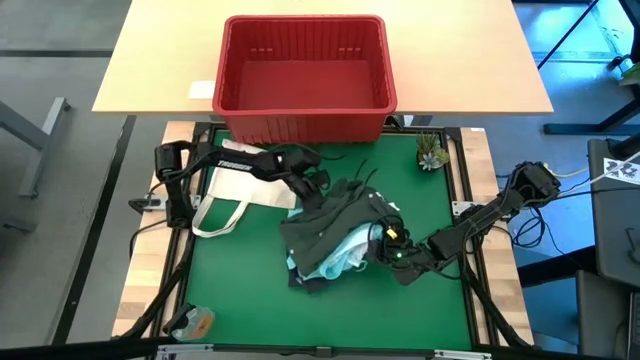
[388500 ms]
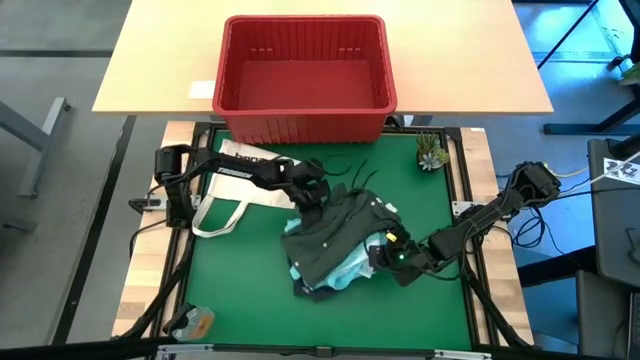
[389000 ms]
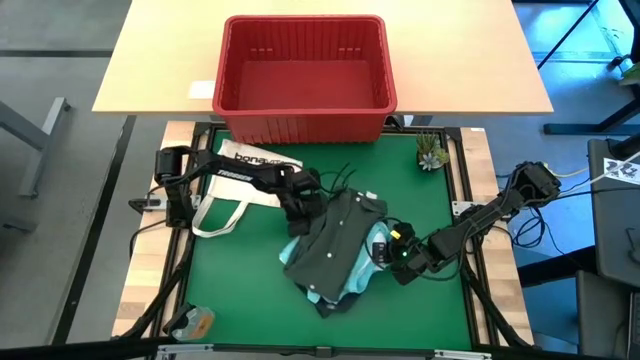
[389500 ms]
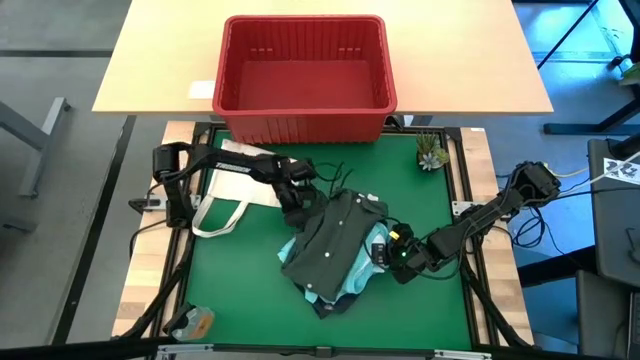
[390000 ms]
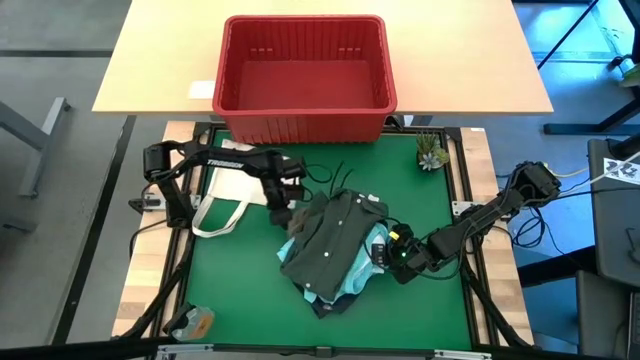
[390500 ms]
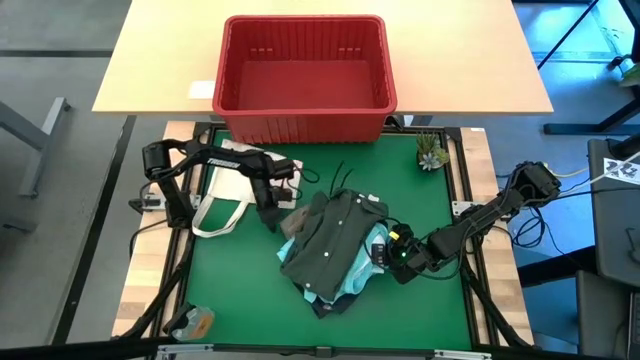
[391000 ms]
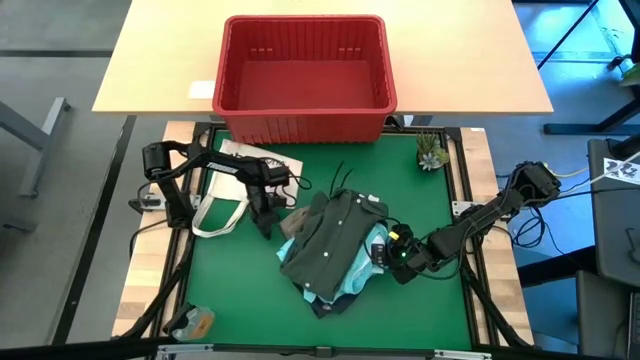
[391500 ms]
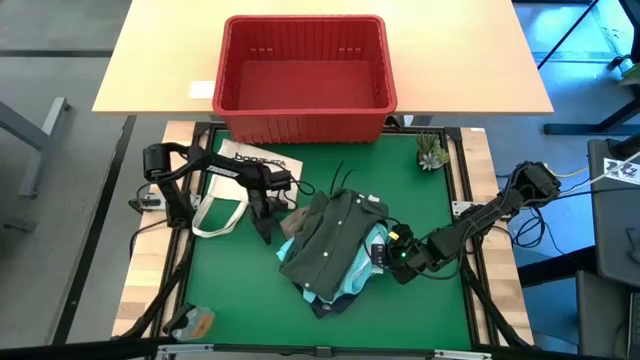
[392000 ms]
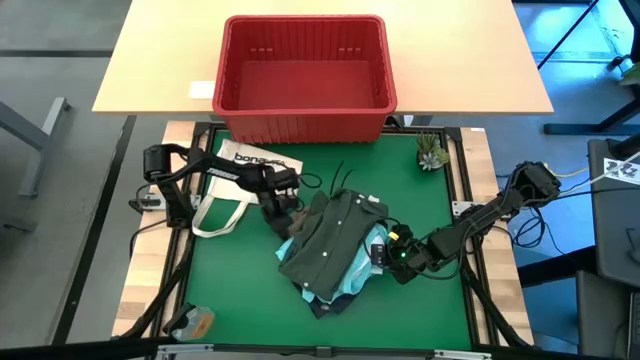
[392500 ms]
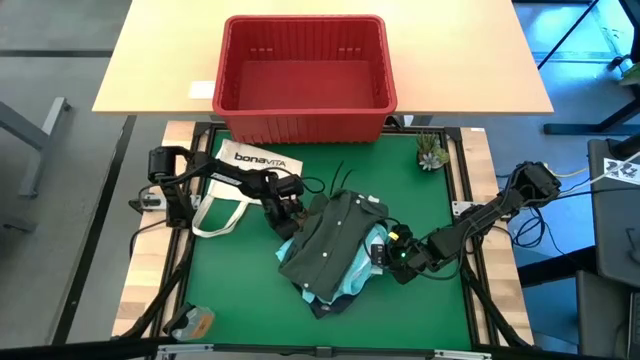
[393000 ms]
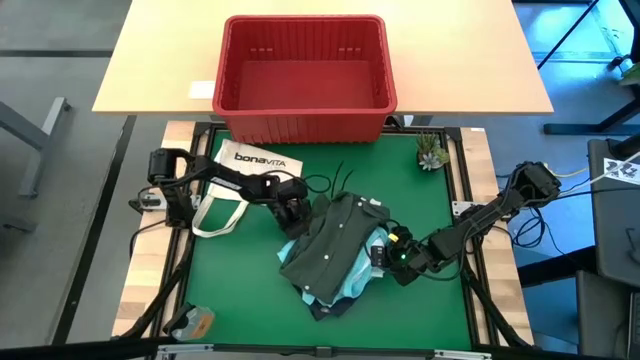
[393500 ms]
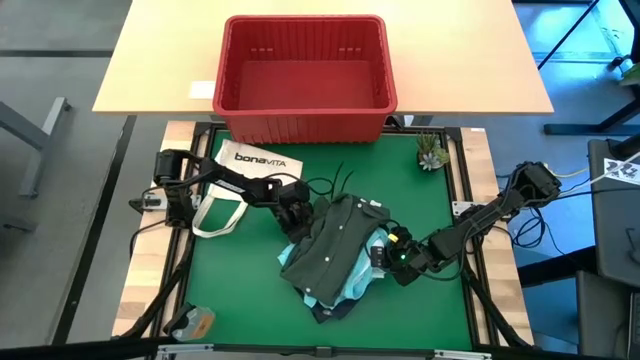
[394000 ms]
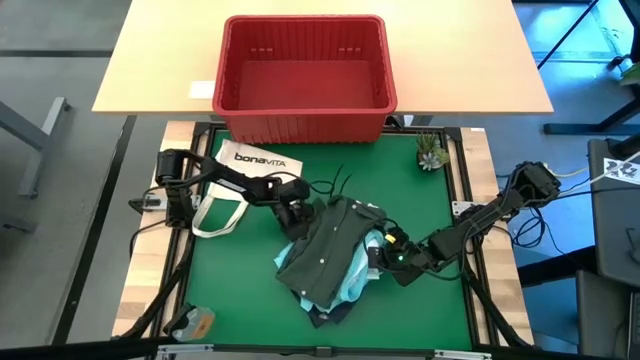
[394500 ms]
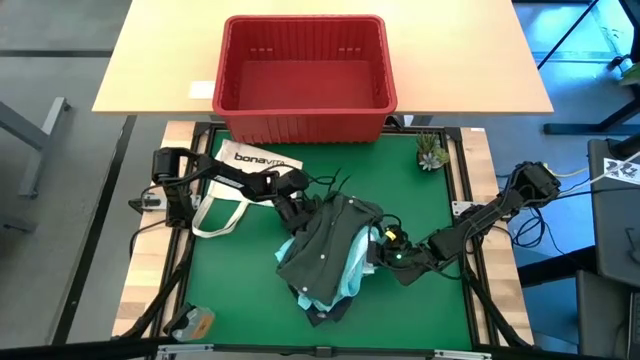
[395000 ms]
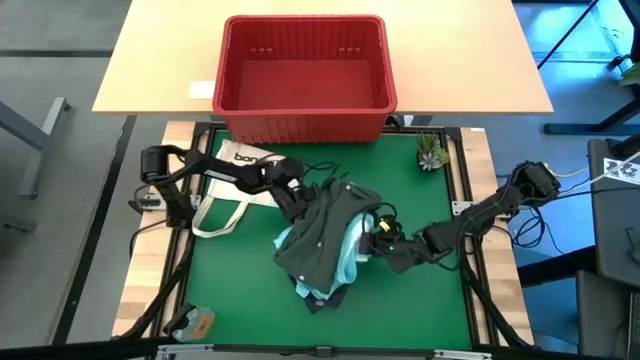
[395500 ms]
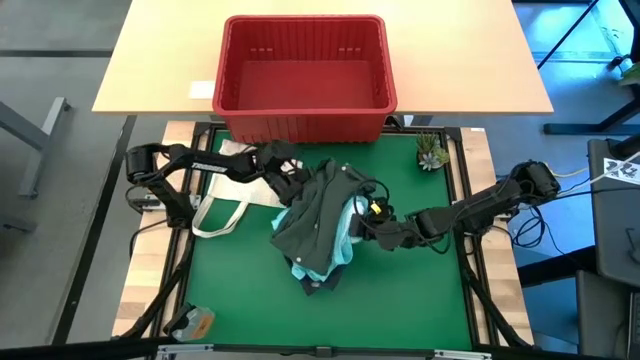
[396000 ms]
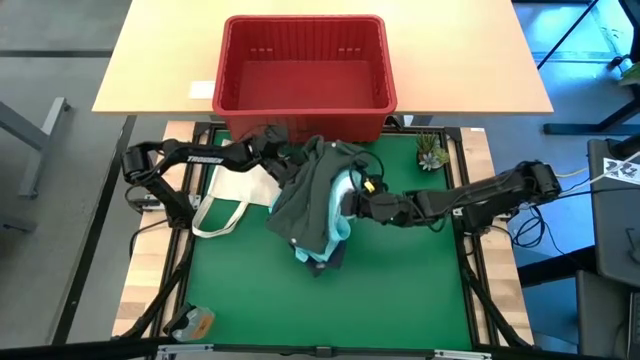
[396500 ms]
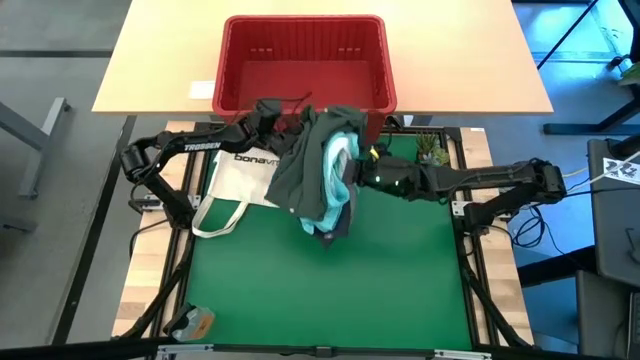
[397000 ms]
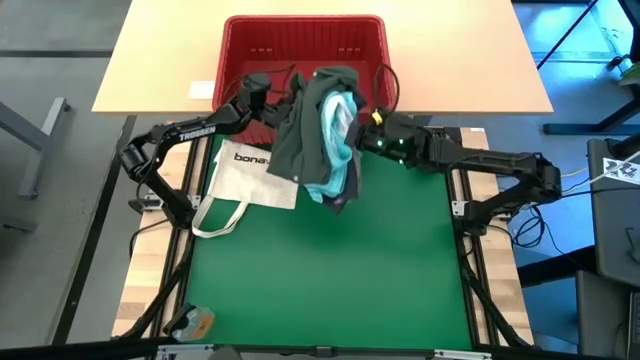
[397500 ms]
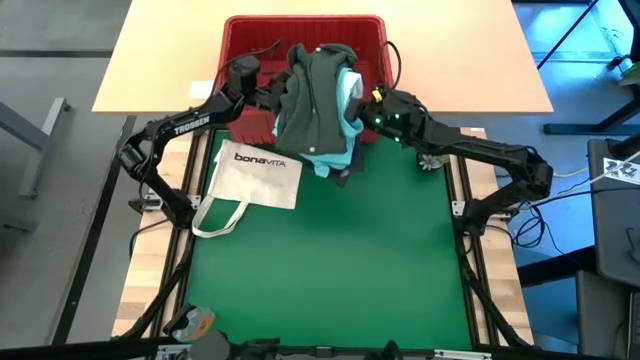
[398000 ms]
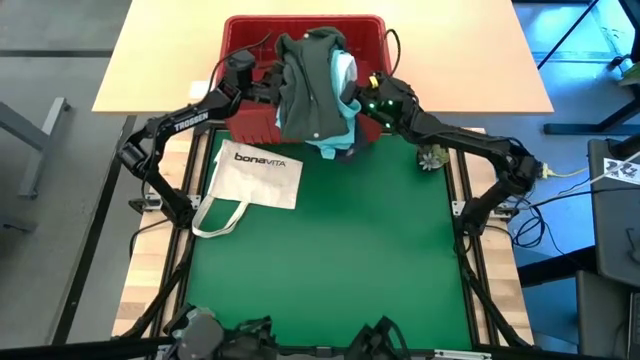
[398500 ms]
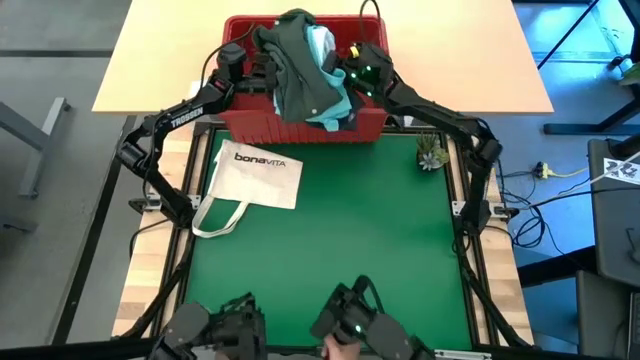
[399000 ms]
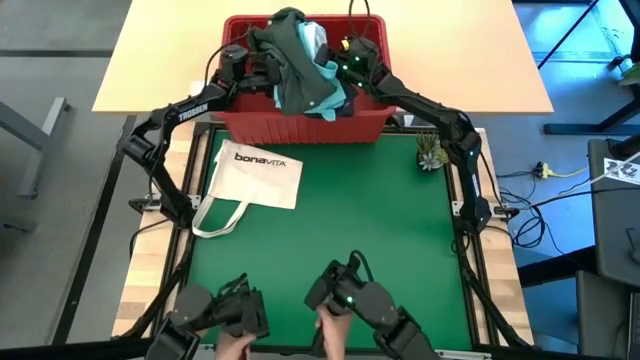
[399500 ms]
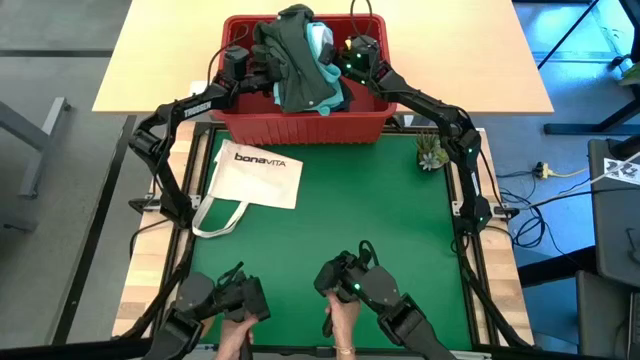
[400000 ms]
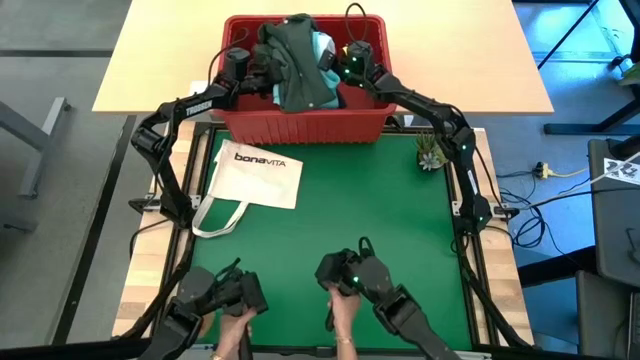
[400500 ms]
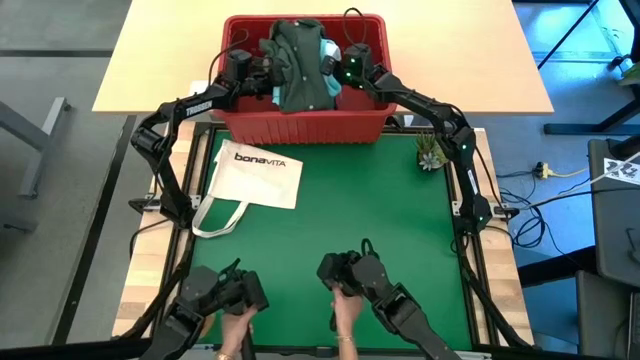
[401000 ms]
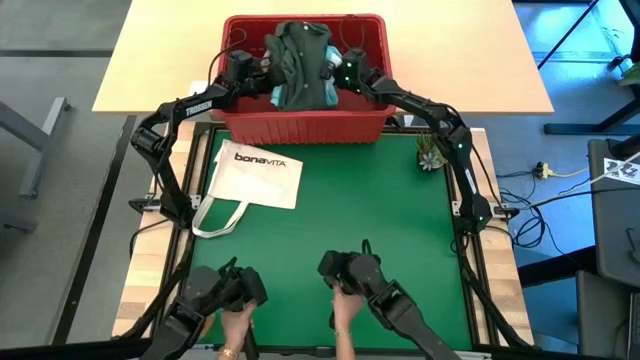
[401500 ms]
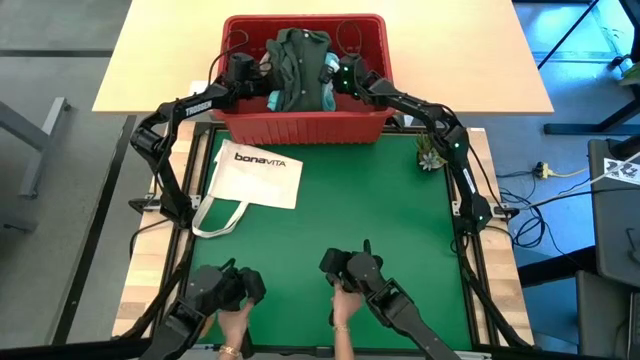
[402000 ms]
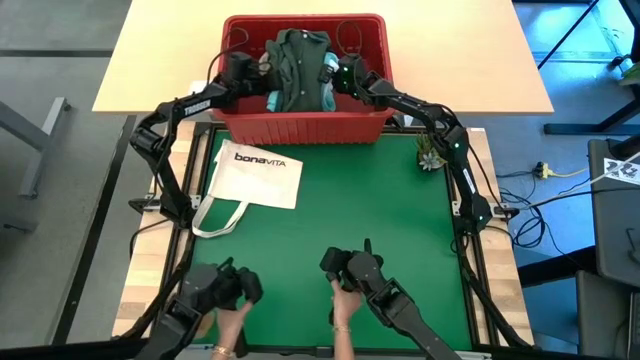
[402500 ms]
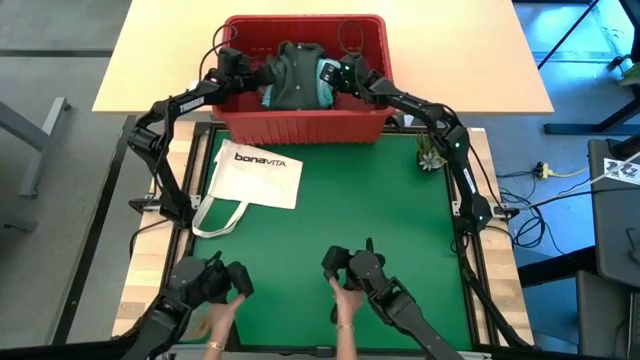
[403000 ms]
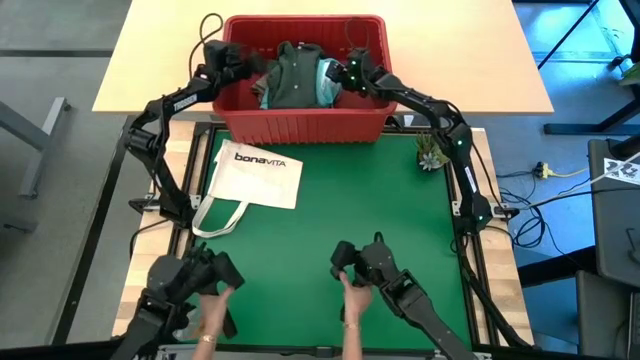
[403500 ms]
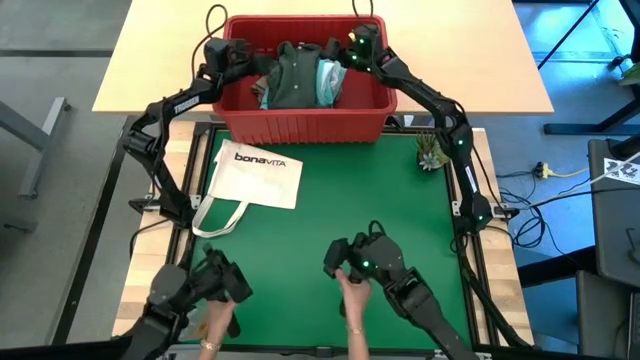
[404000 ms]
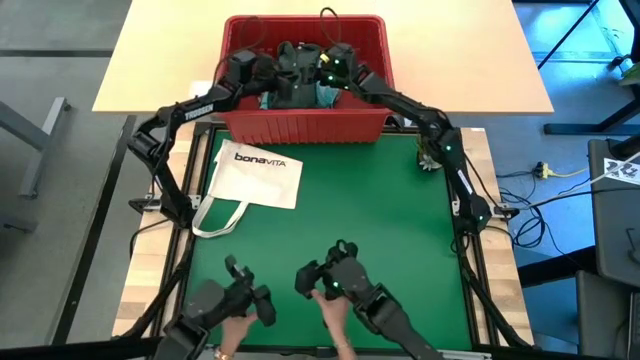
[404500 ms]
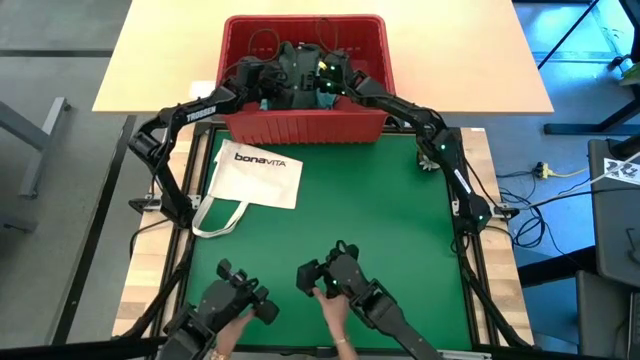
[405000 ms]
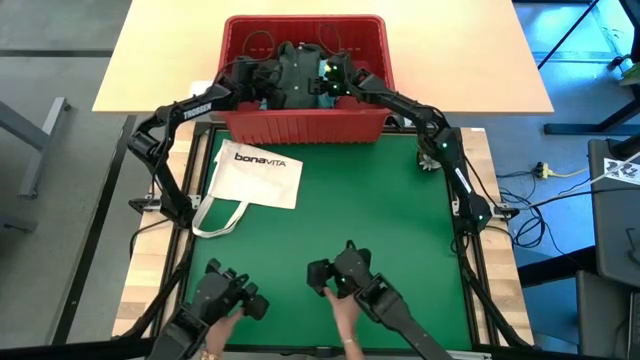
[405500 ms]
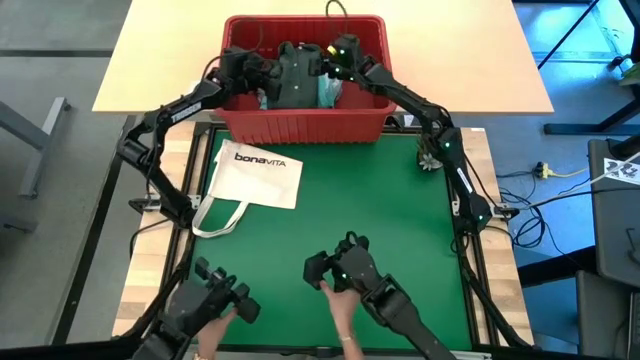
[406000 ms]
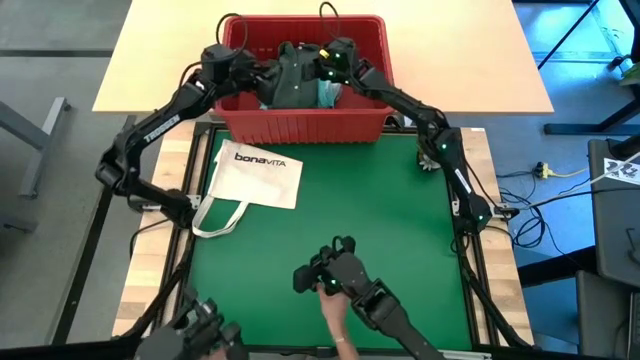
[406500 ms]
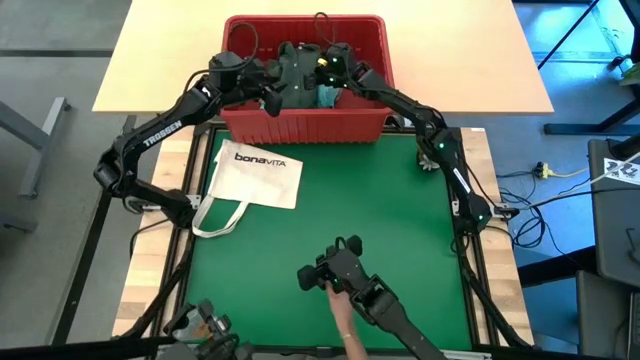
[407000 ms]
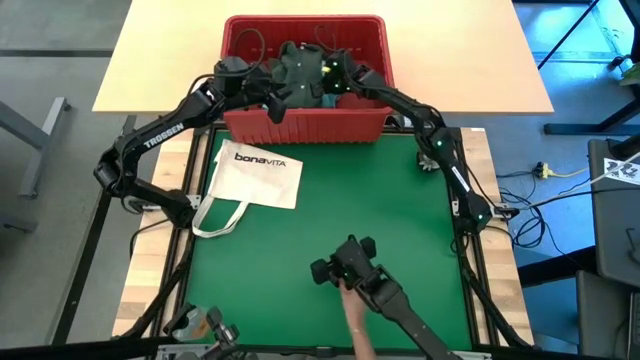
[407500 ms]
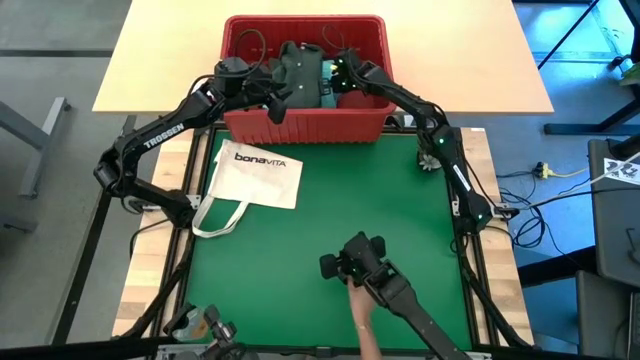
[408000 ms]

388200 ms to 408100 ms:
Task: Fold Laundry from Bin
Put the stack clothes into the red laundry bin

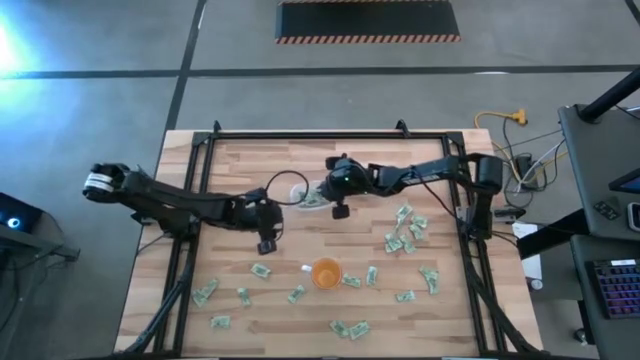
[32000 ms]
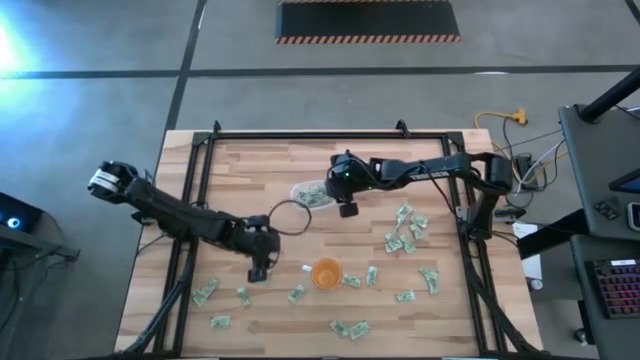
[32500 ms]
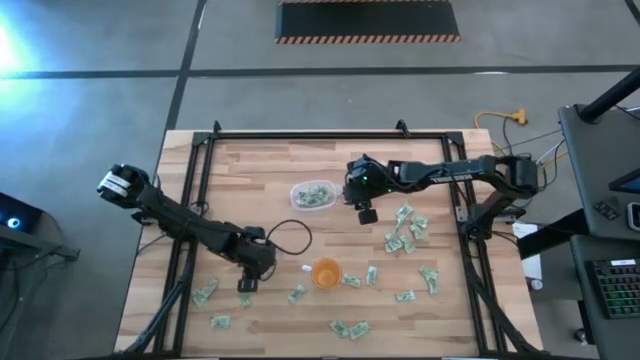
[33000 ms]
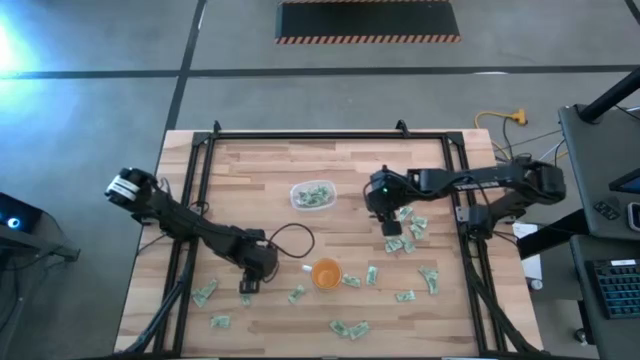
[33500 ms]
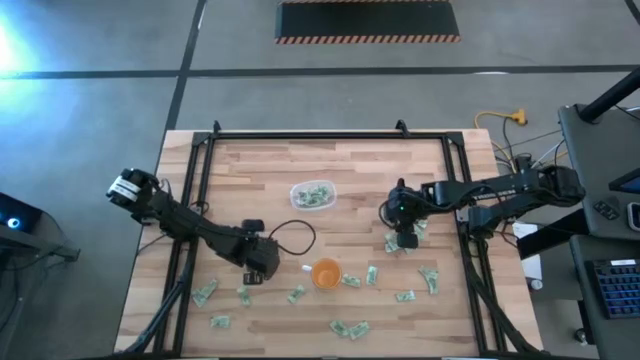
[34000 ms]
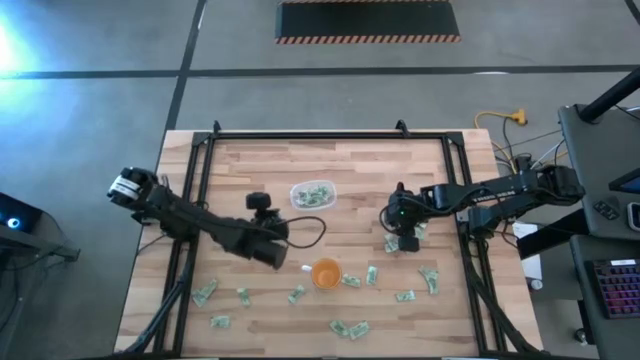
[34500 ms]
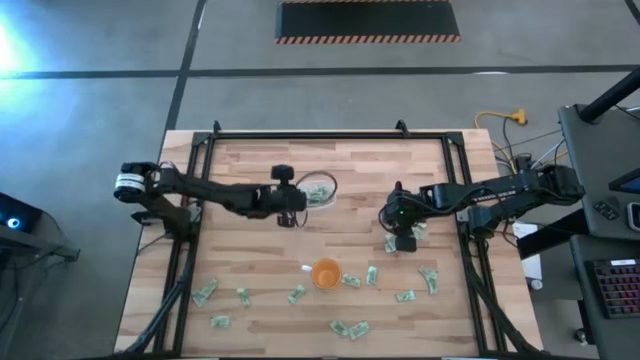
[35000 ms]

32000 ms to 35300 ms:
Task: Pick and place Stevia / Truvia into bins
Put the stevia packet into the transparent bin
